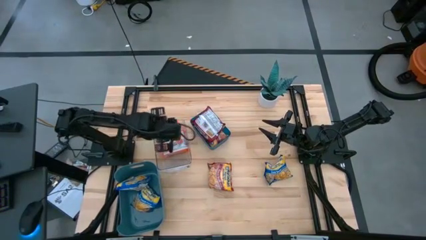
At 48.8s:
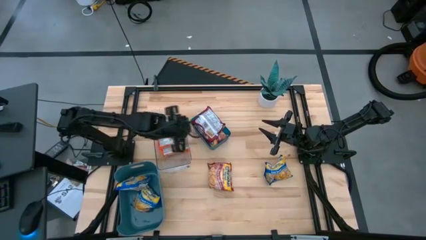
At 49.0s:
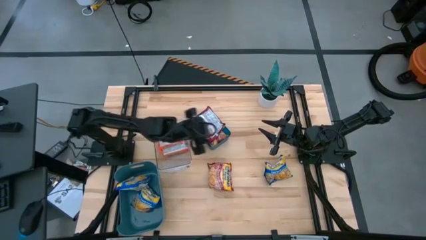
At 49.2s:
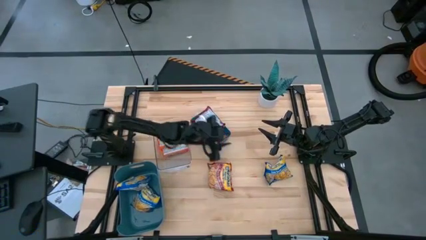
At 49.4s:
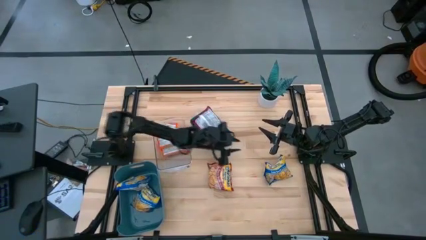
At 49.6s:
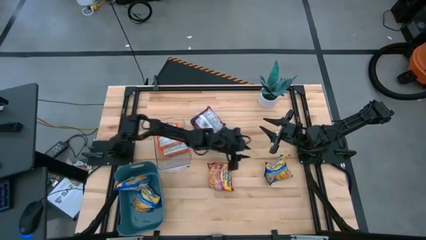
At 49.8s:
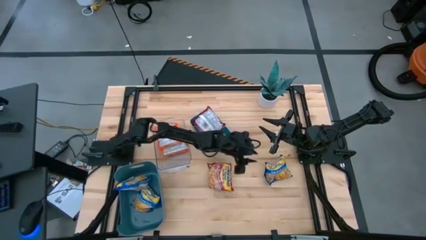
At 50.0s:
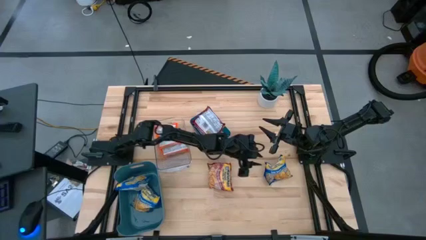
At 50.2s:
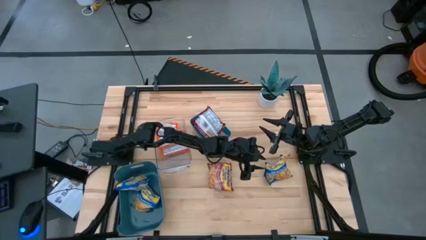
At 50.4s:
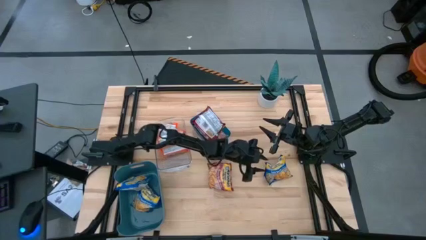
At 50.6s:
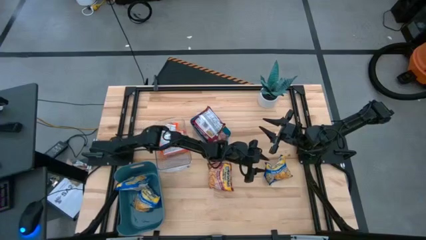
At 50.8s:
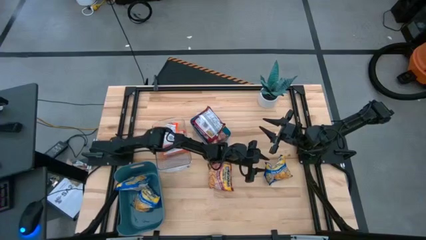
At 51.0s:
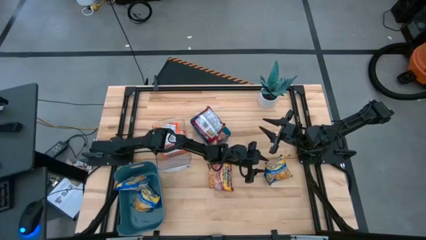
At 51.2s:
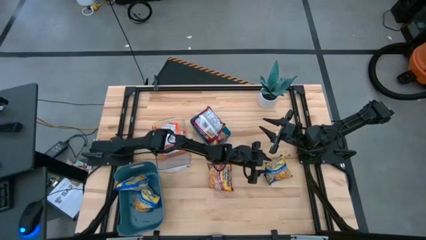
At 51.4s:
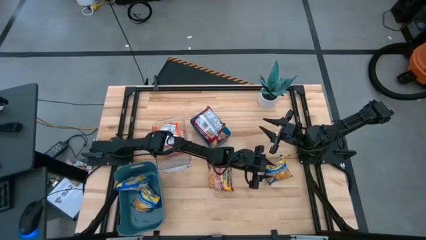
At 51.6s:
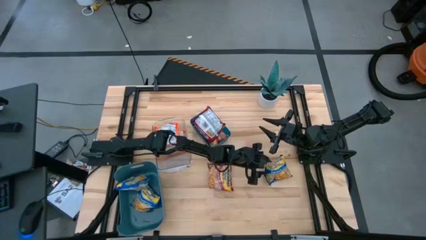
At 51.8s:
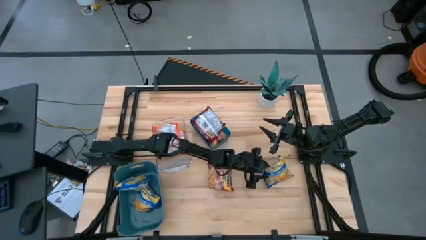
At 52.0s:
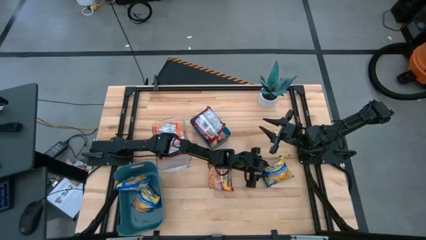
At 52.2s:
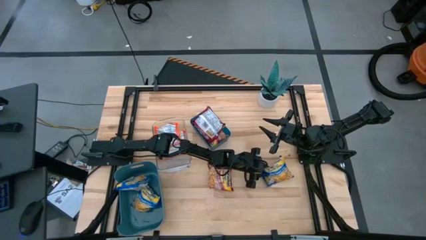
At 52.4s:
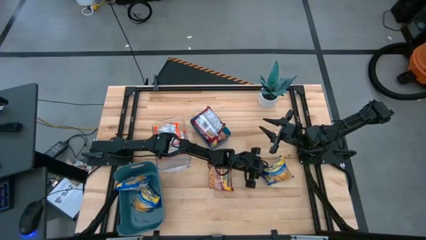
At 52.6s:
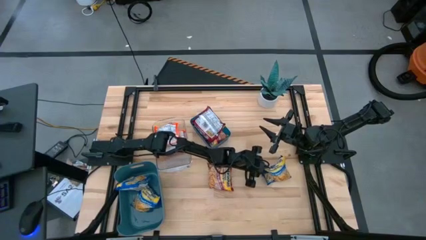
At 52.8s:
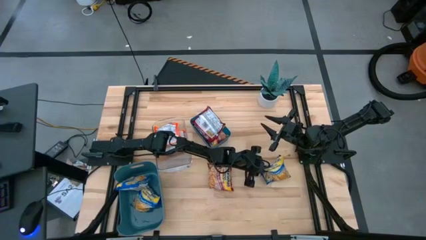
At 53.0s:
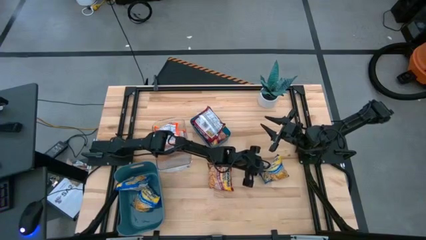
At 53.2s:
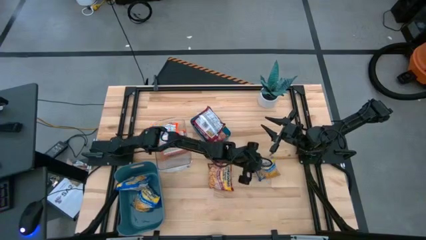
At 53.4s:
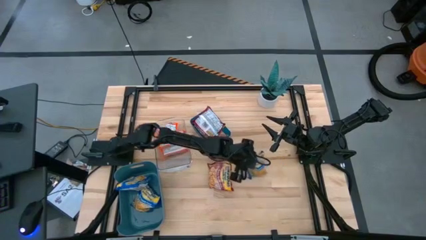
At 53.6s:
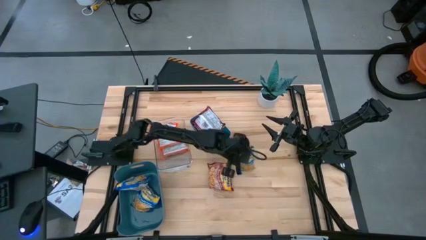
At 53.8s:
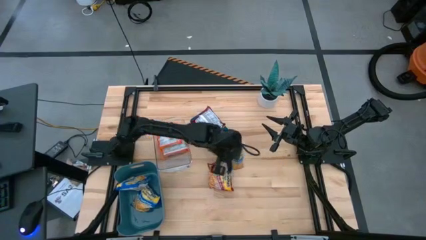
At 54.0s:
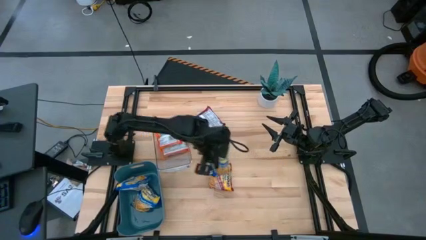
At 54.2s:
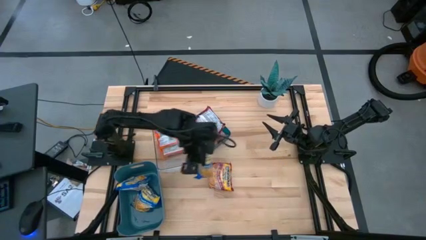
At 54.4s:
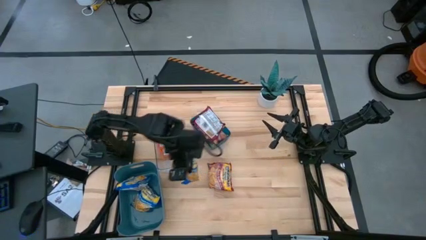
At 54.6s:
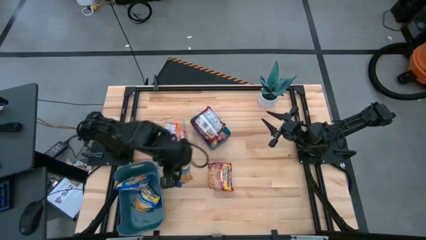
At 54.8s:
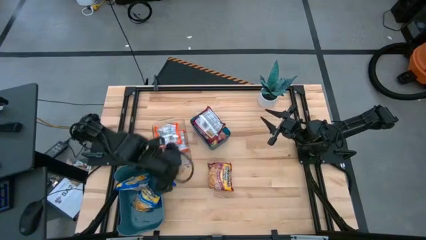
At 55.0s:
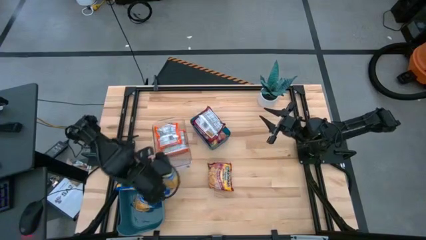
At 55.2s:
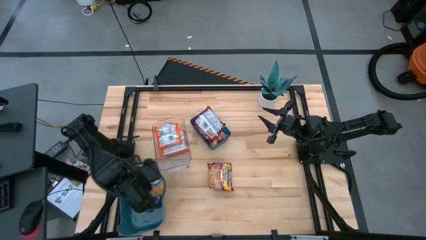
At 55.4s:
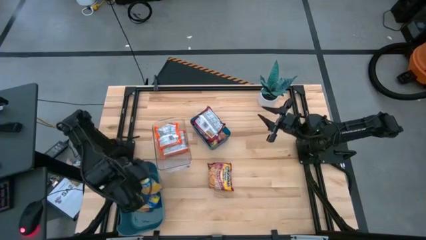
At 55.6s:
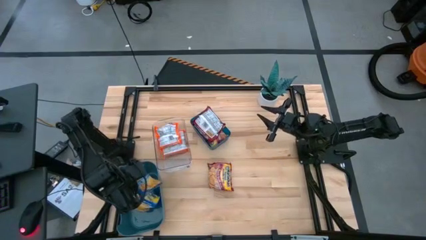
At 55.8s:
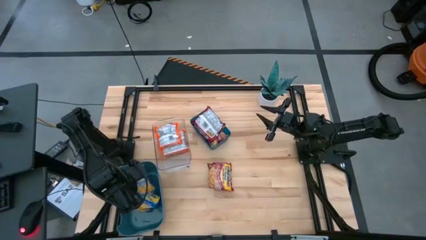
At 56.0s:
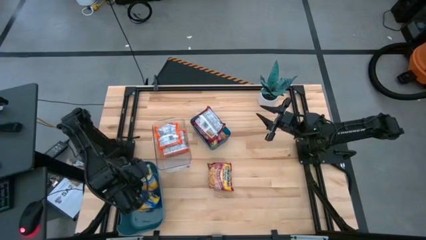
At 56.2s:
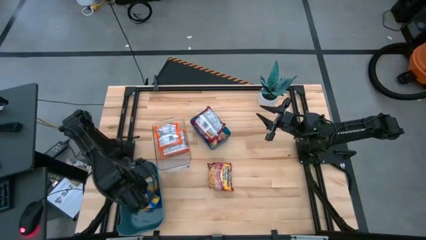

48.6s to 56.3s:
Task: Sort Maruchan noodles
Put the blue noodle pack into the green bin

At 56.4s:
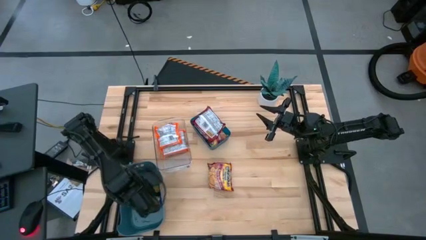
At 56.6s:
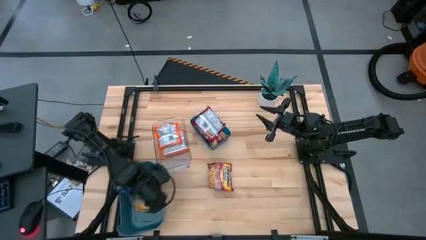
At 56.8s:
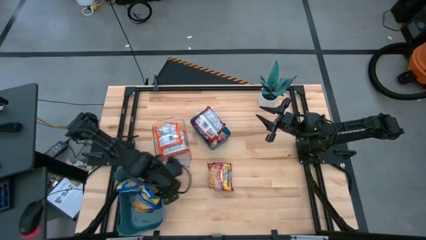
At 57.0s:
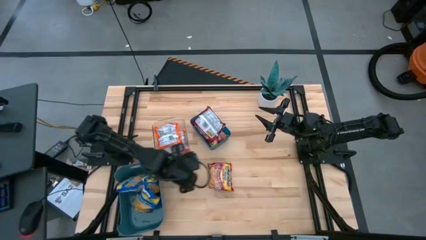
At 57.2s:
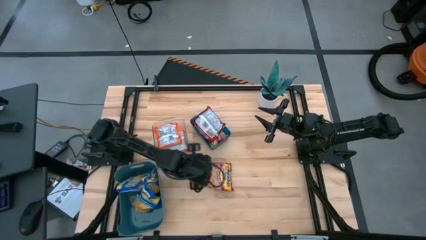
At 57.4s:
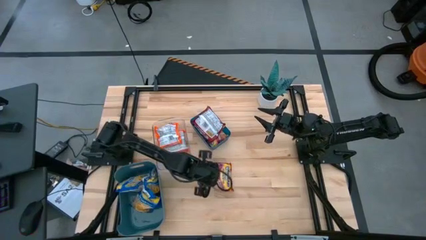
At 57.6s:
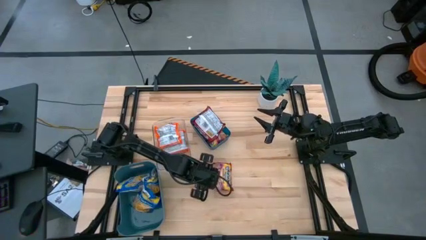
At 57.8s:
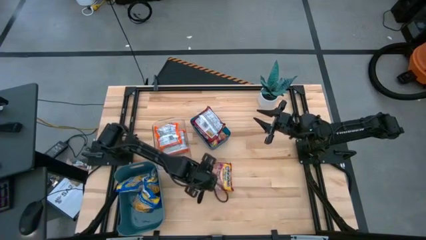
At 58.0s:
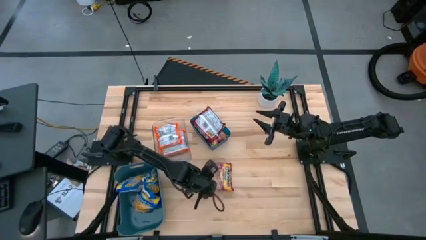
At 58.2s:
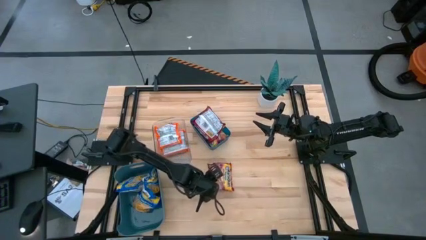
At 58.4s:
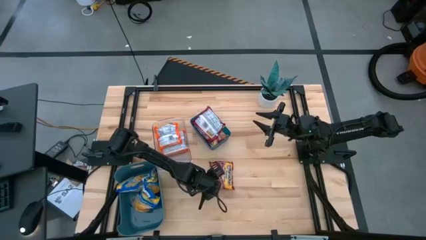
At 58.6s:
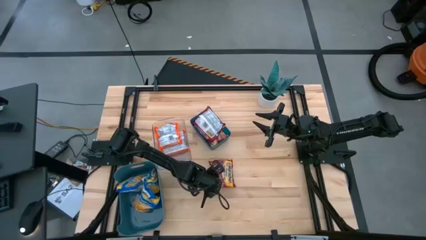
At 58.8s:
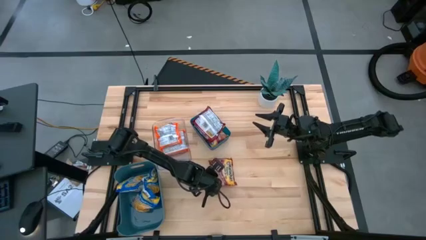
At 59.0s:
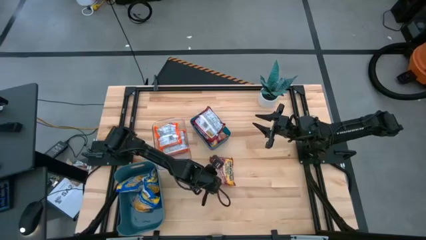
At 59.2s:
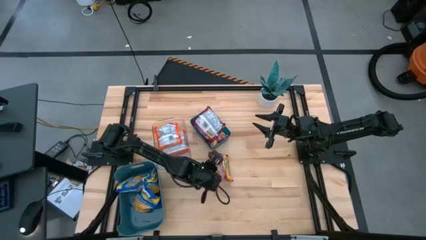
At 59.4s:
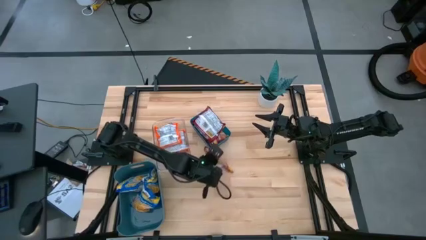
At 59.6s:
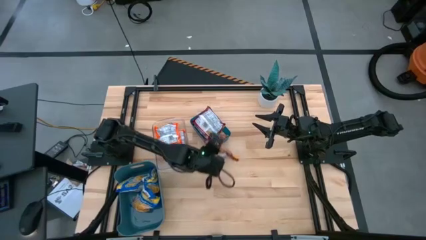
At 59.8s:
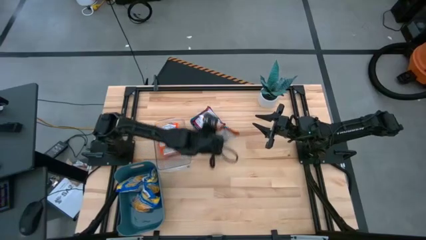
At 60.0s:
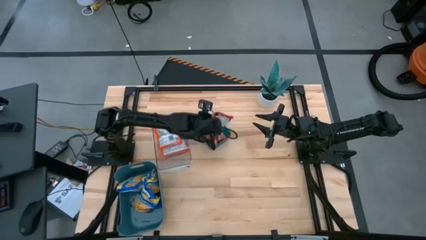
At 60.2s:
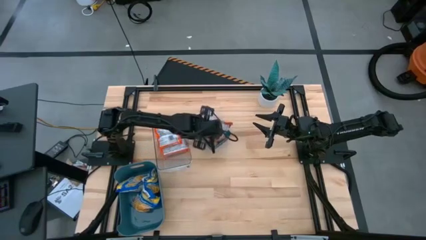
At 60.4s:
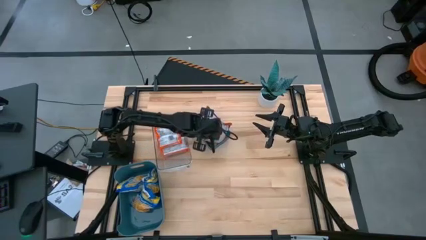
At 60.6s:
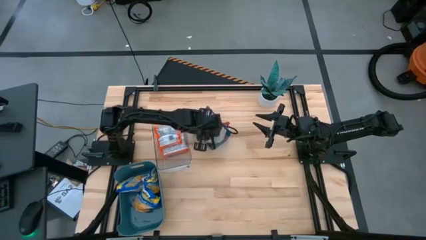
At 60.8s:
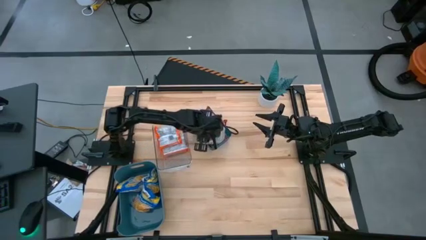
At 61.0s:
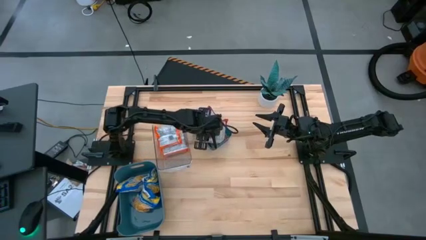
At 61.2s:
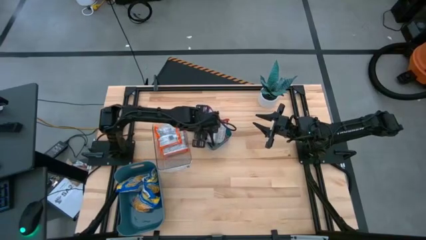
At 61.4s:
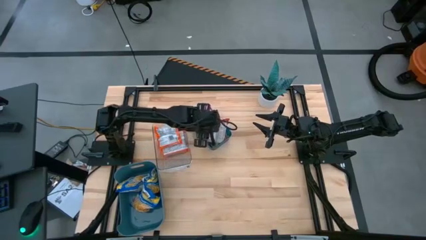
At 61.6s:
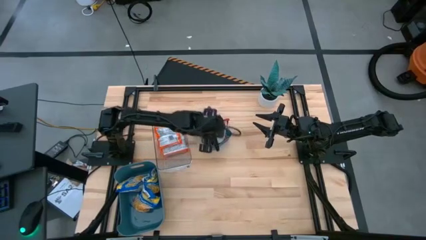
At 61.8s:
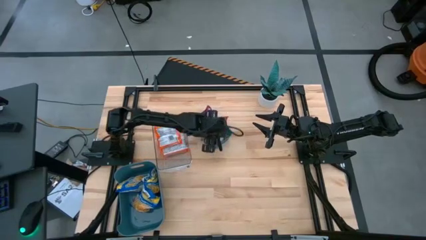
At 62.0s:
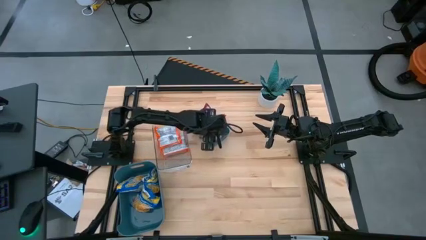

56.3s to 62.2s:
Put the red noodle pack into the blue bin

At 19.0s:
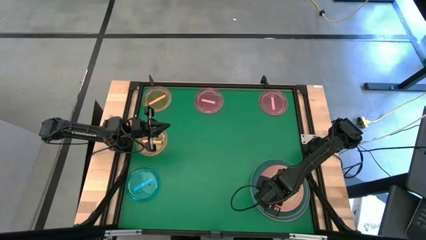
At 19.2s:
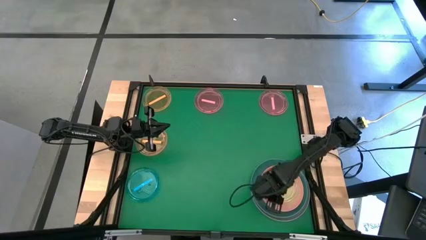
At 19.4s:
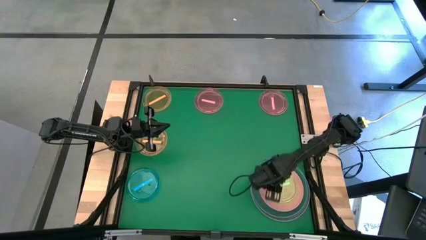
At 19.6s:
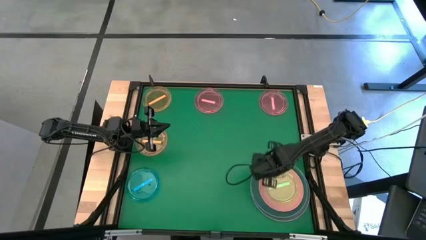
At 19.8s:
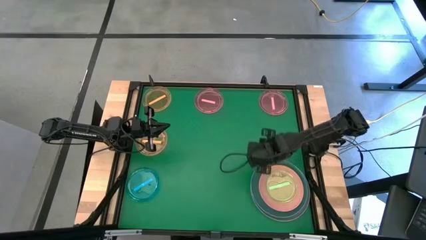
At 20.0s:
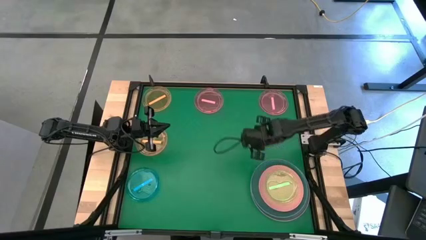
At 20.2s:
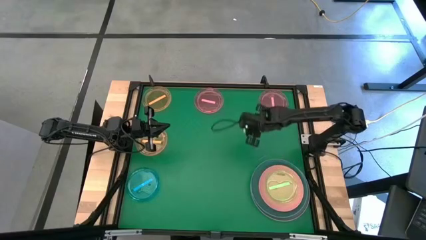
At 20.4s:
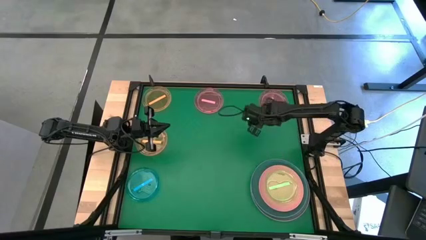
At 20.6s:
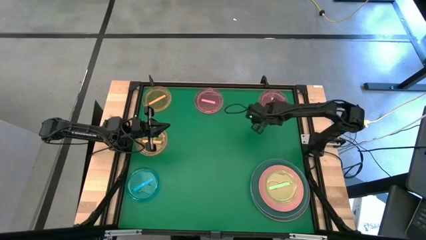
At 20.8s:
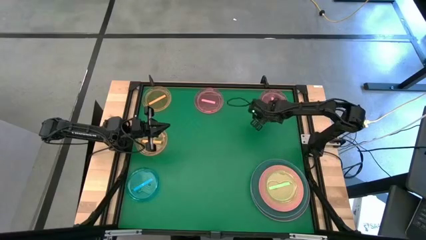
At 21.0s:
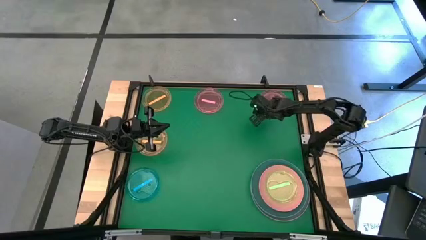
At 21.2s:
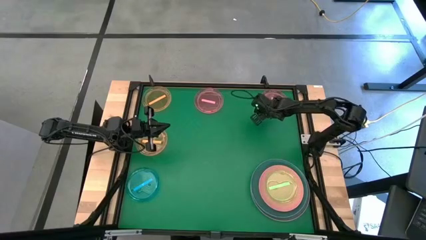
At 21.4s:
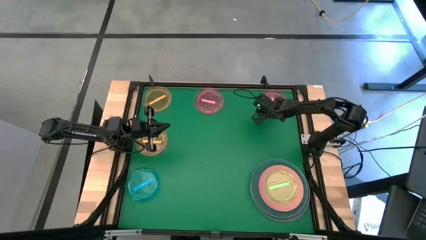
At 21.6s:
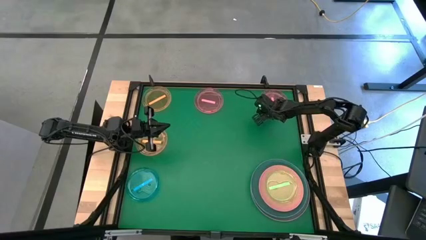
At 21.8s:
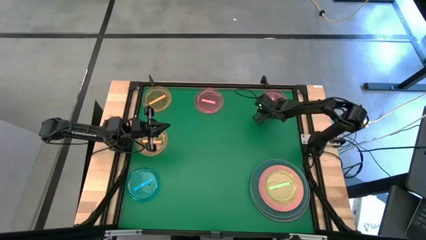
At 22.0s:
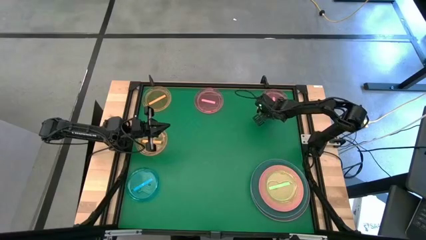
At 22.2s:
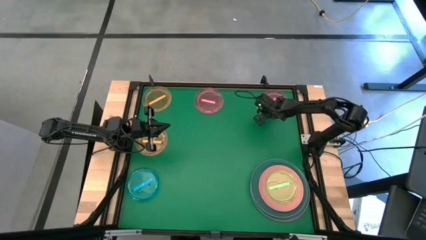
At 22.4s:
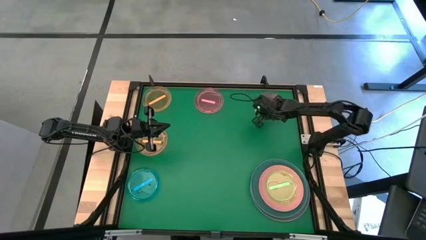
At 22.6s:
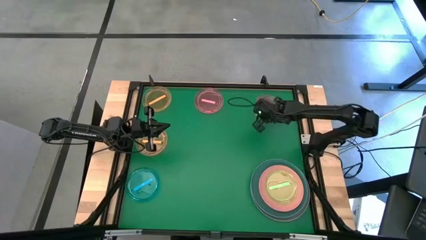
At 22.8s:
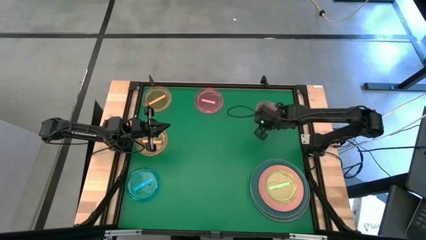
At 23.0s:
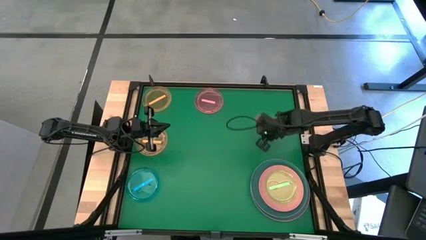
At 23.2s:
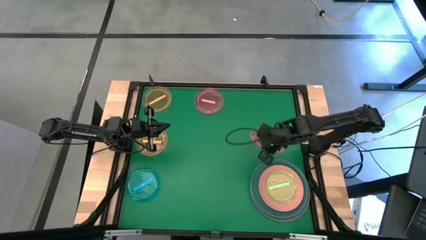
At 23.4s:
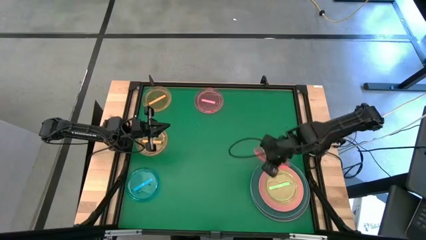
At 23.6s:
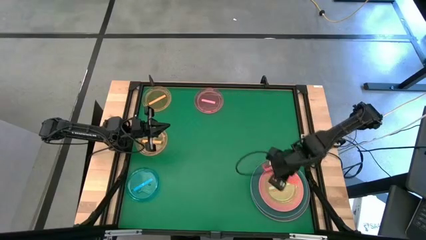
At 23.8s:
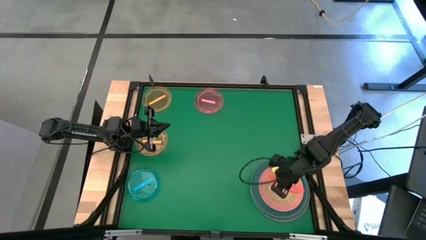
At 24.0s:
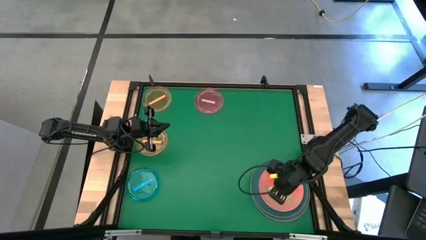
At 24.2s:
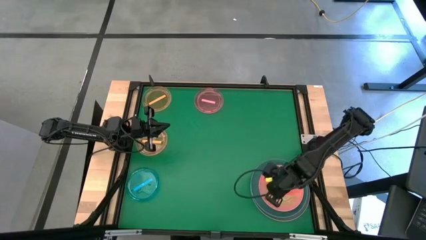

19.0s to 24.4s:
Task: Stack plastic plates
Stack the right light red plate on top of the light green plate
